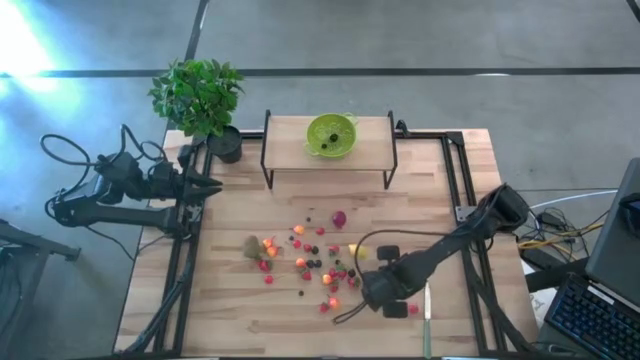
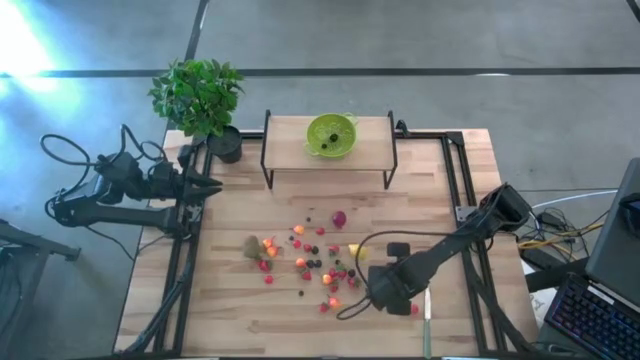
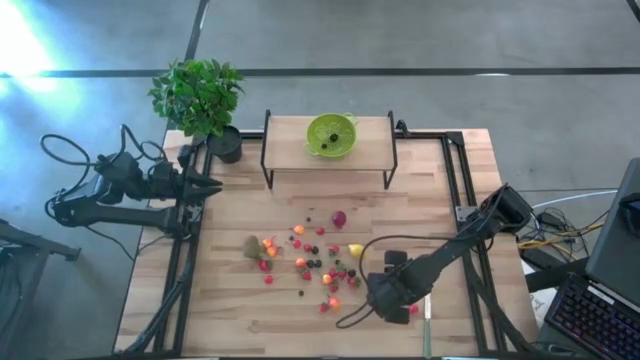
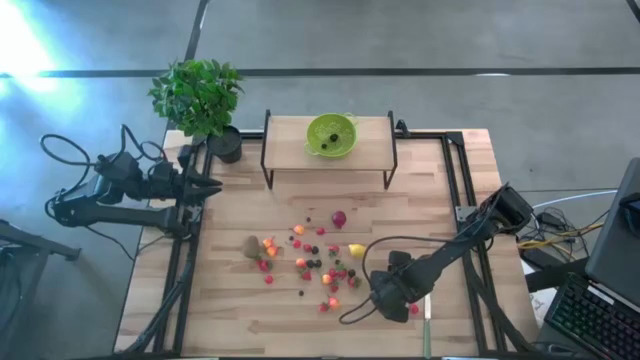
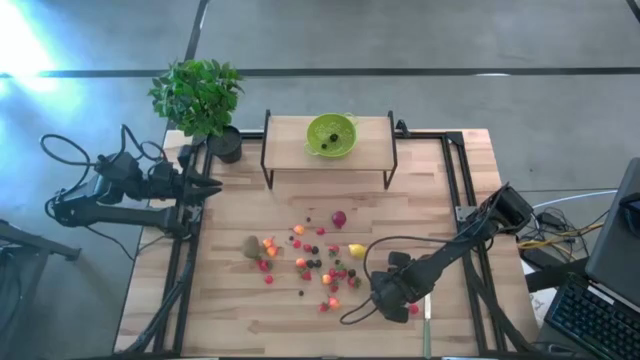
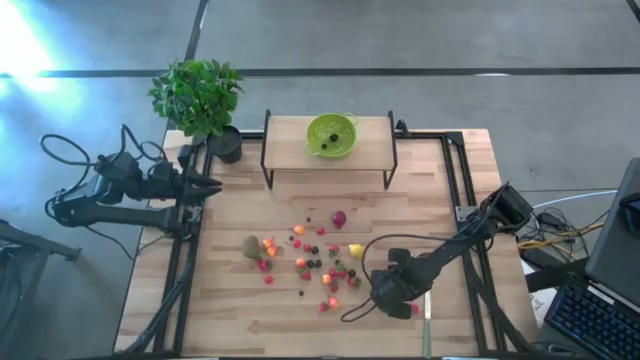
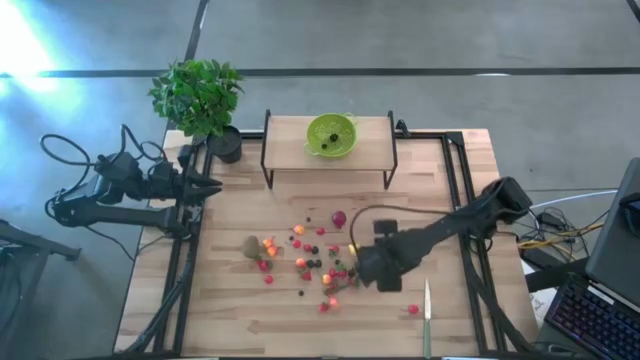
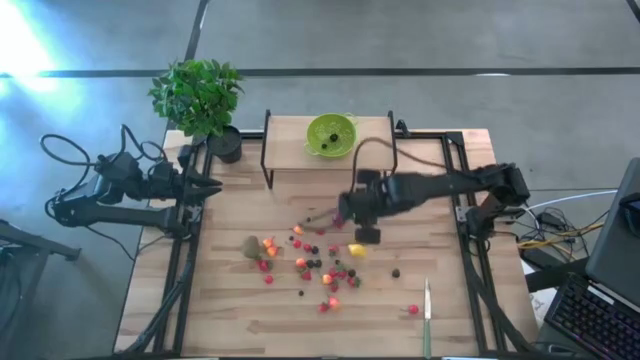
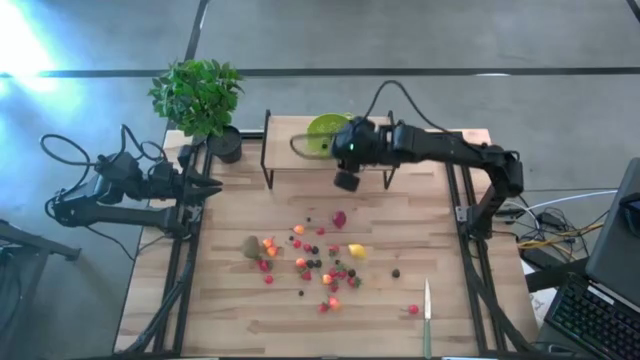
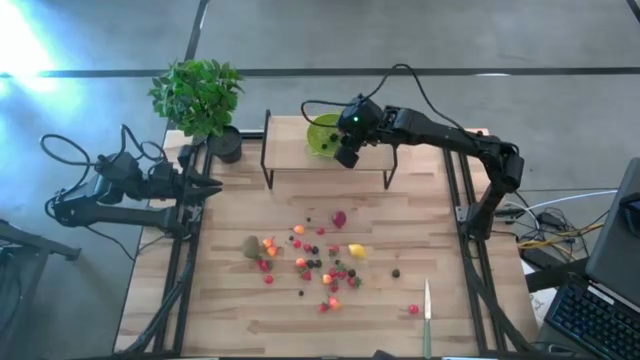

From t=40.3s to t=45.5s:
Task: Pick & Place Fruit
Put the red cherry into the green strainer bowl on the shelf

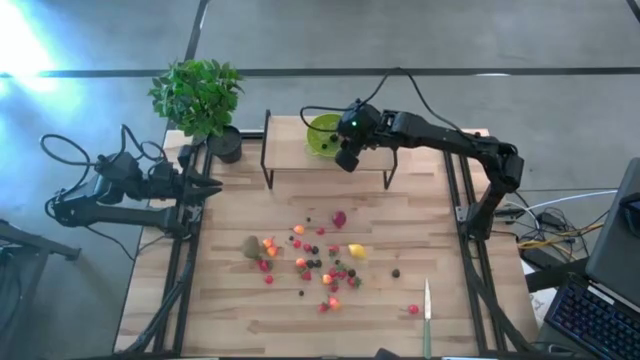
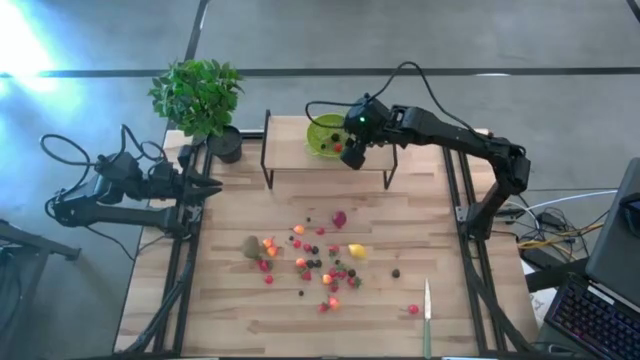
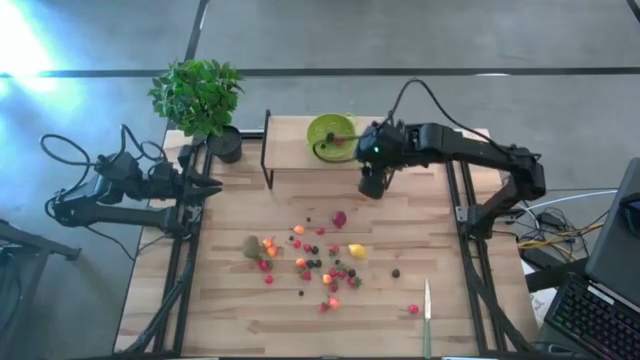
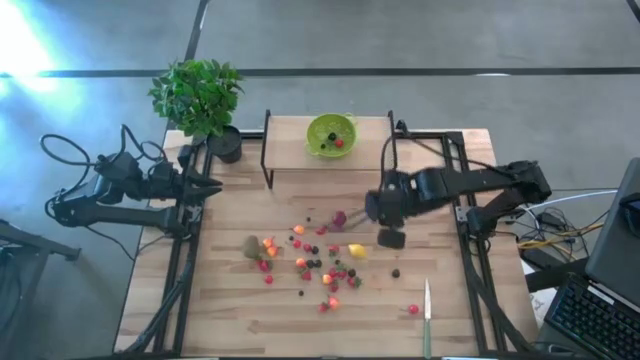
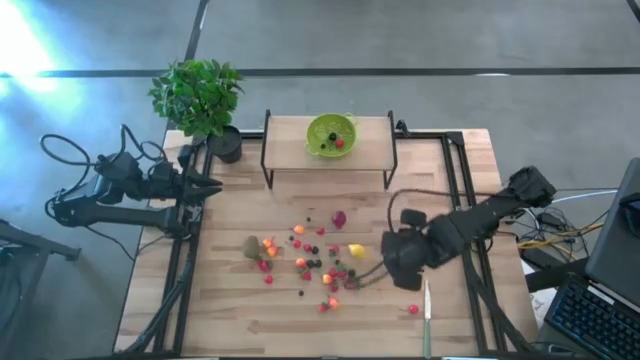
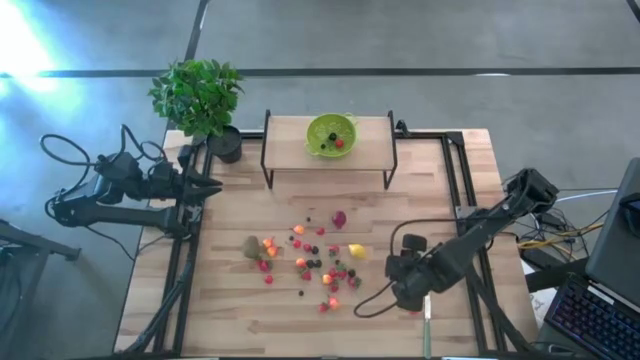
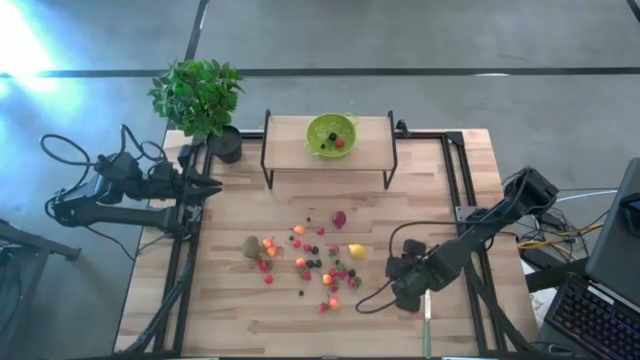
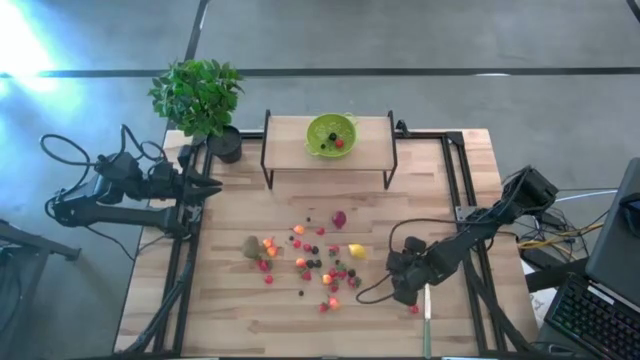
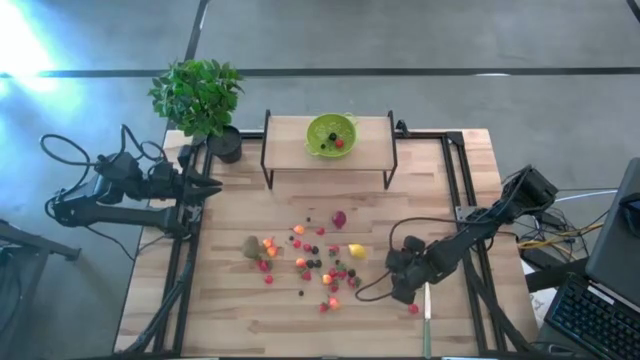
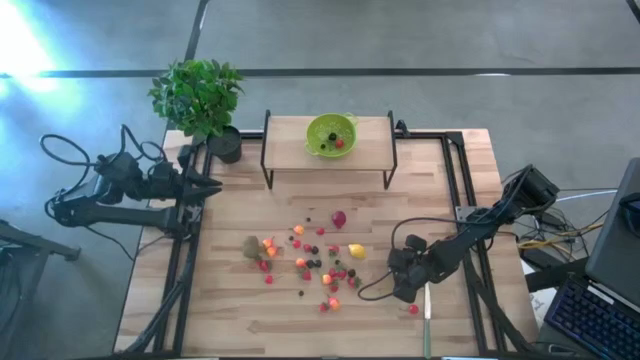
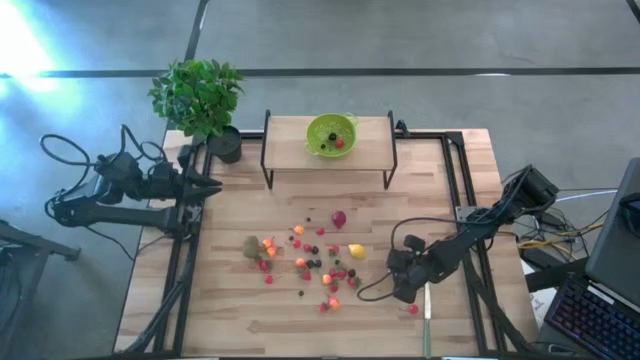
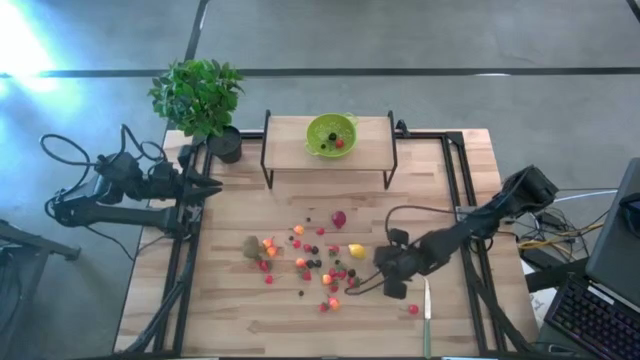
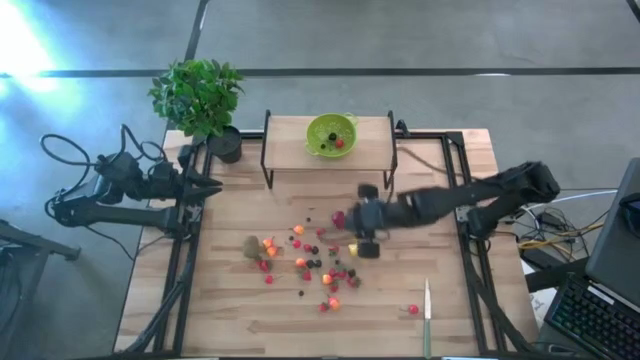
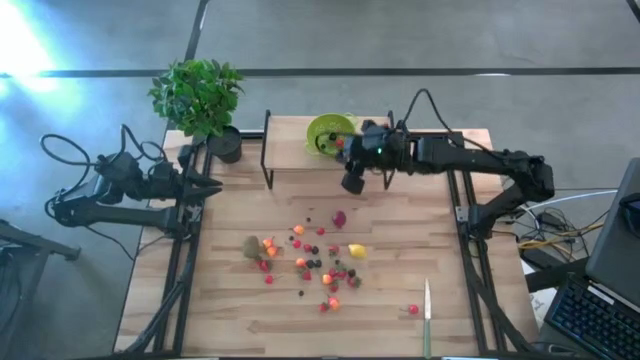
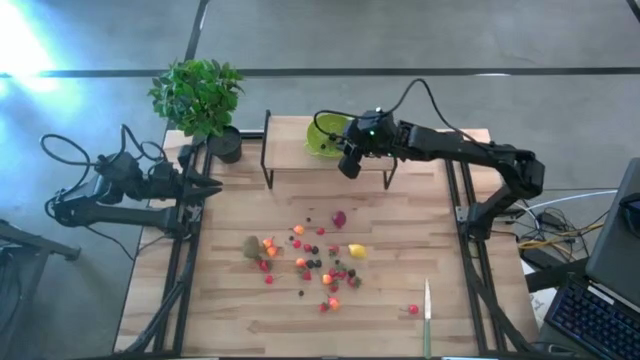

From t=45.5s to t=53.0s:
Put the blackberry into the green strainer bowl on the shelf

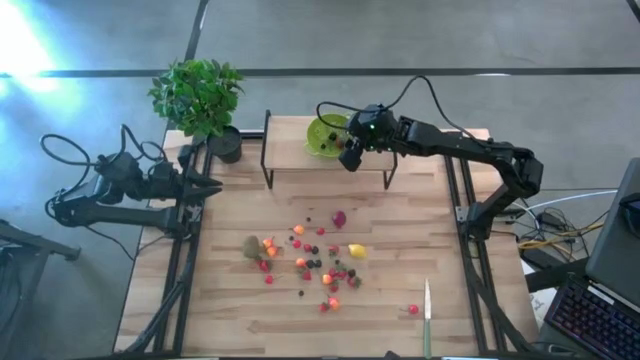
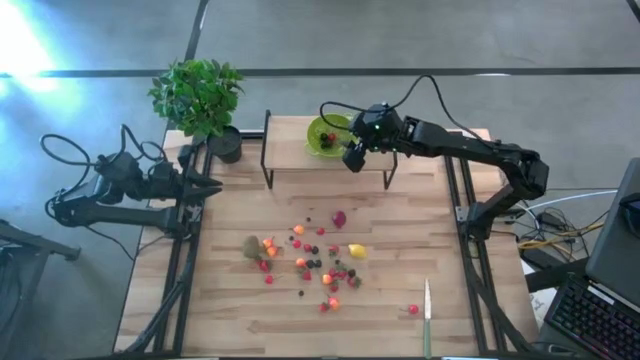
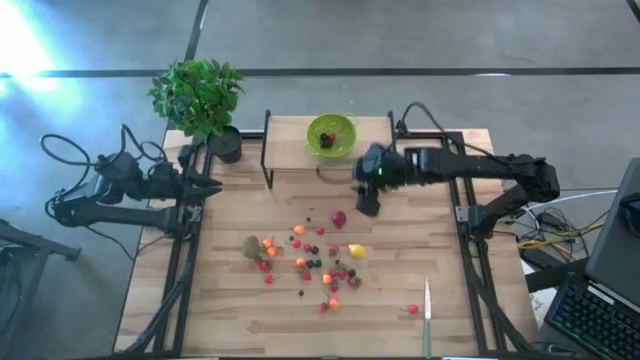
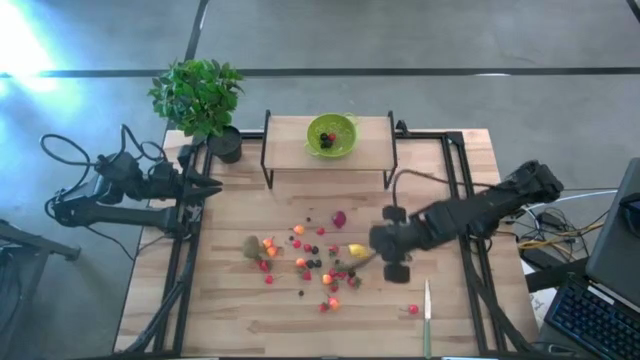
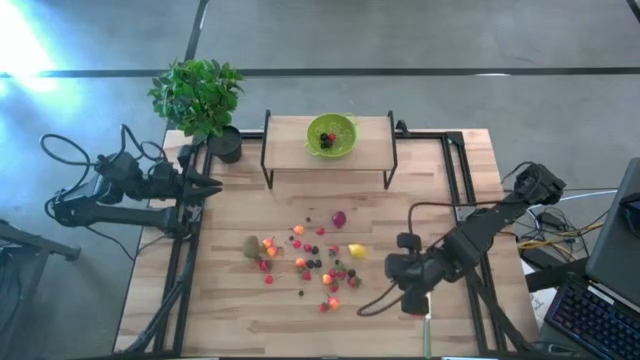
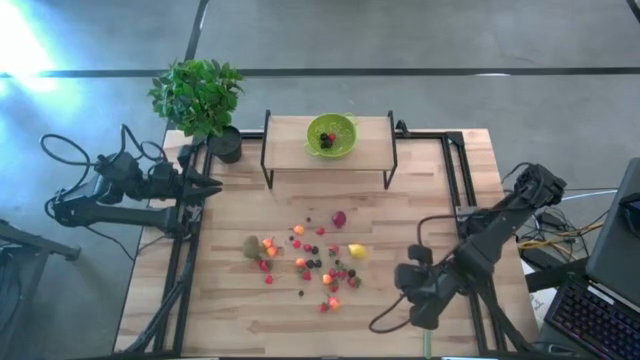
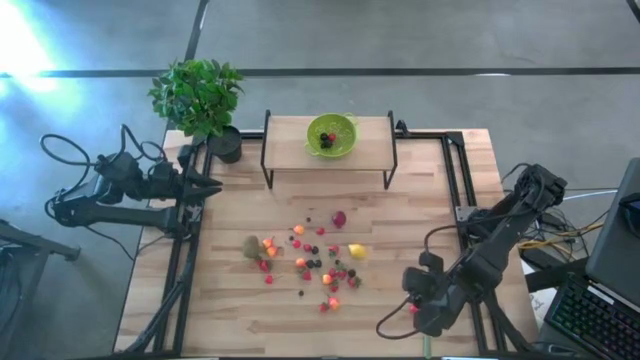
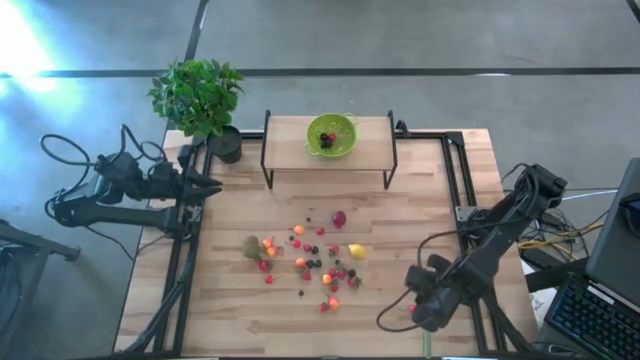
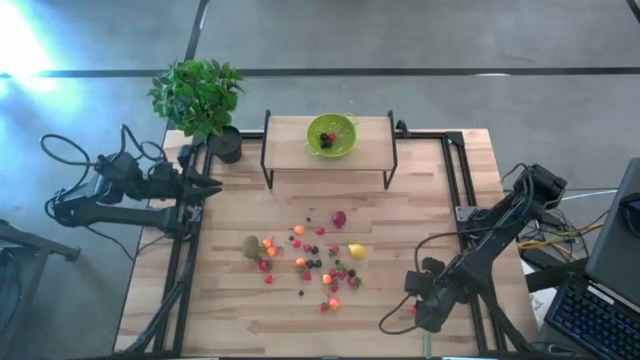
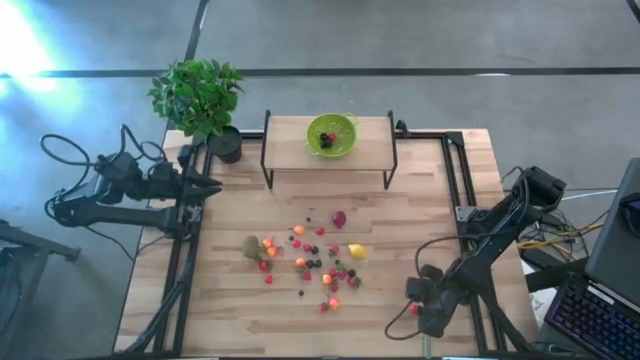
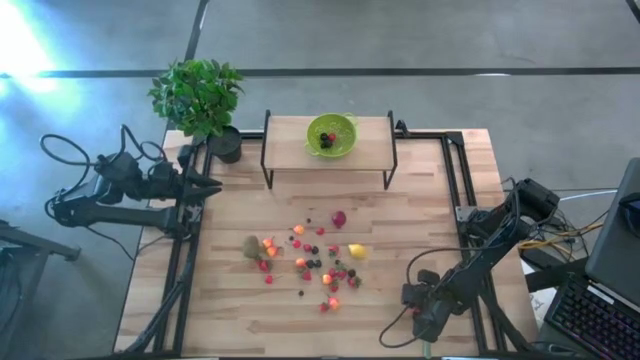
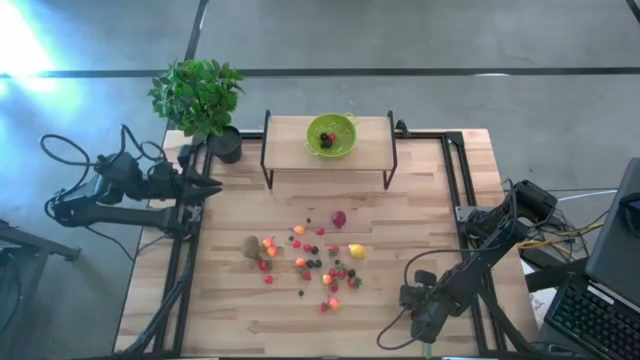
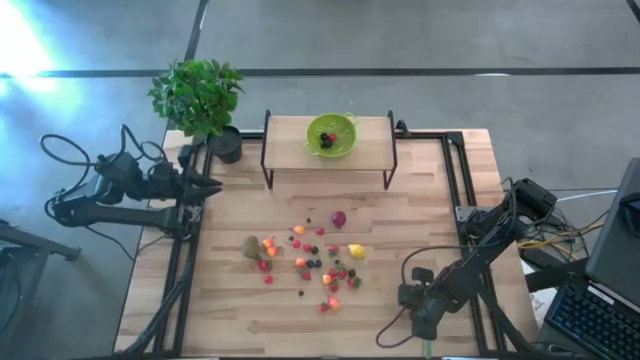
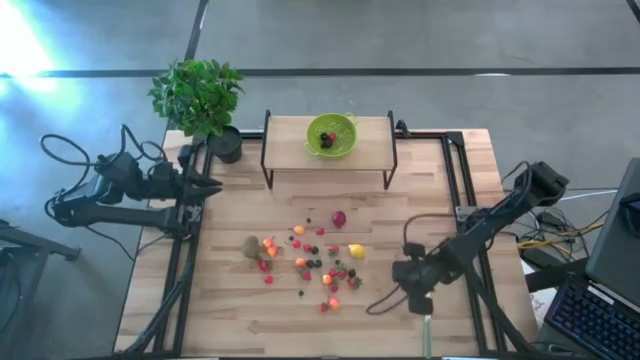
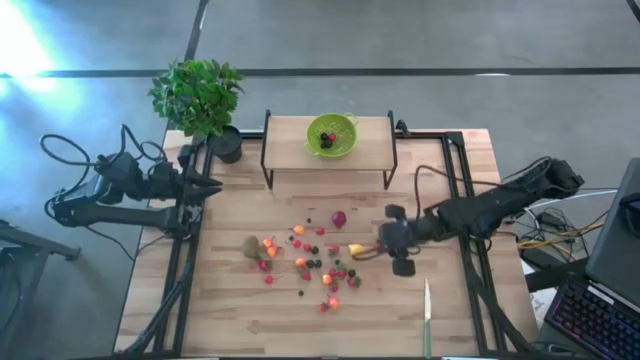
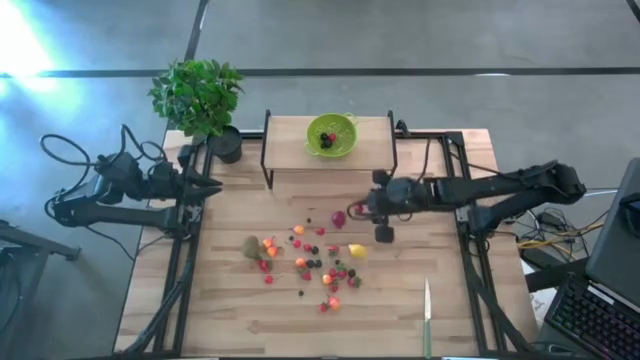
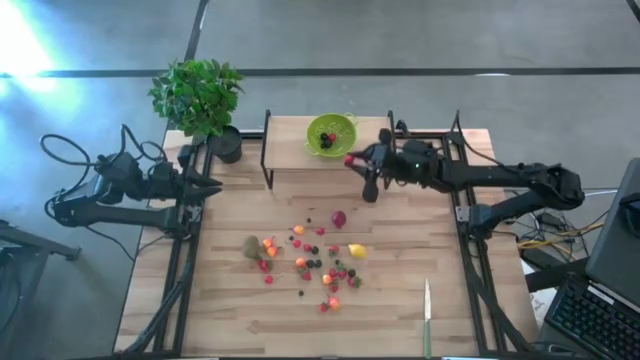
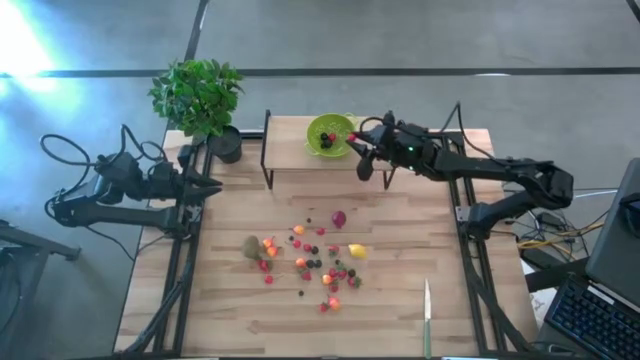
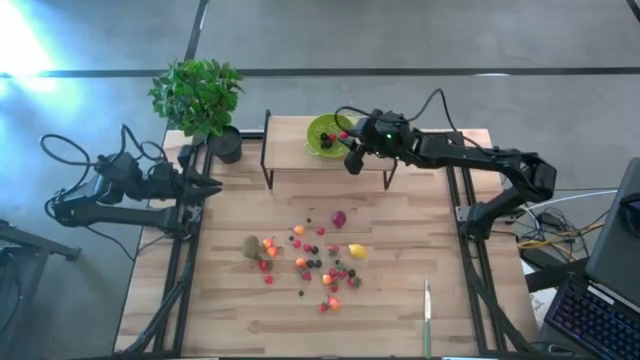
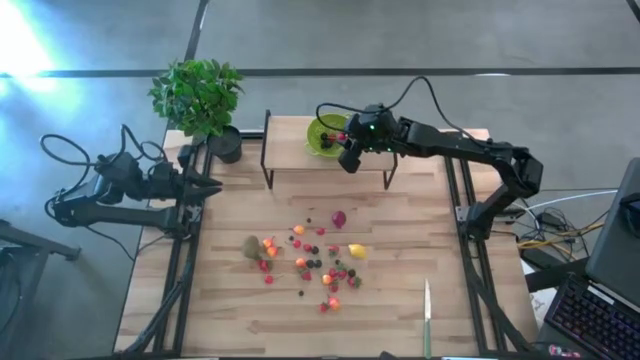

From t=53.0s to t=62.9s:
Put the red cherry into the green strainer bowl on the shelf
